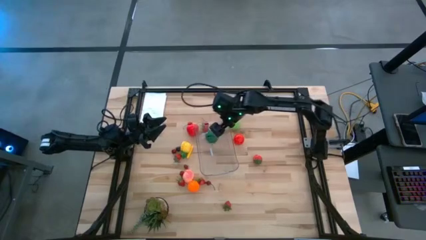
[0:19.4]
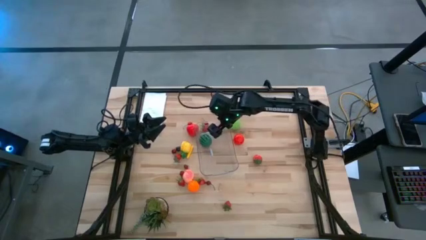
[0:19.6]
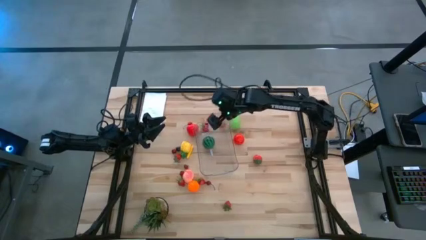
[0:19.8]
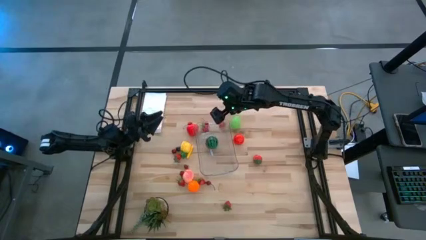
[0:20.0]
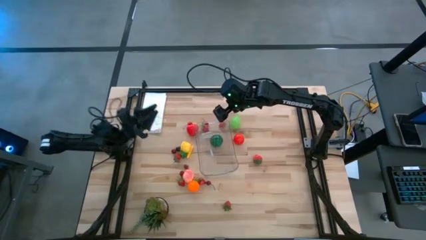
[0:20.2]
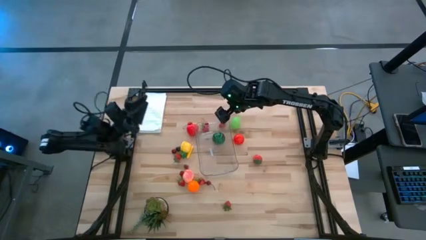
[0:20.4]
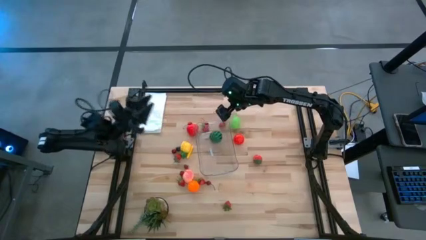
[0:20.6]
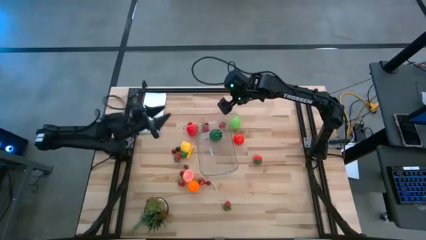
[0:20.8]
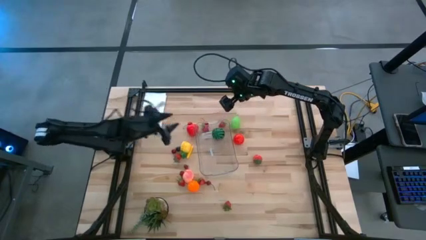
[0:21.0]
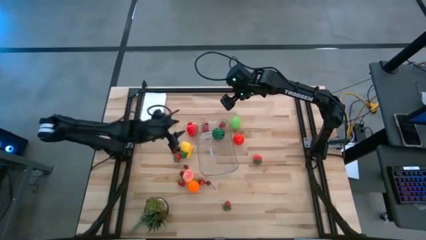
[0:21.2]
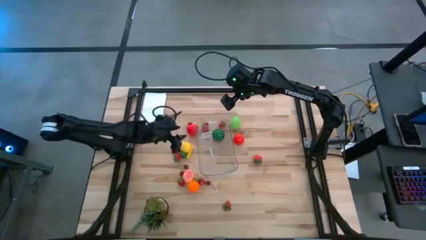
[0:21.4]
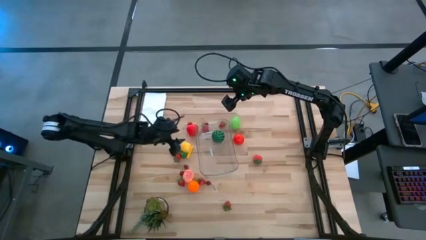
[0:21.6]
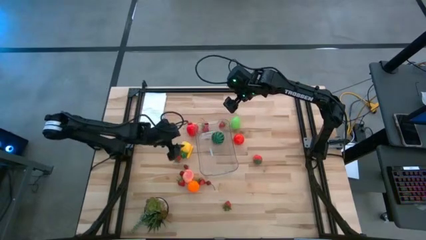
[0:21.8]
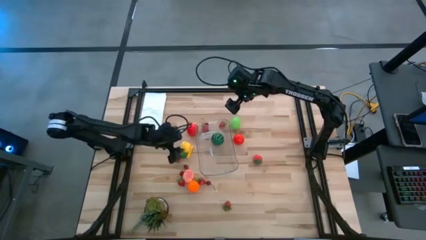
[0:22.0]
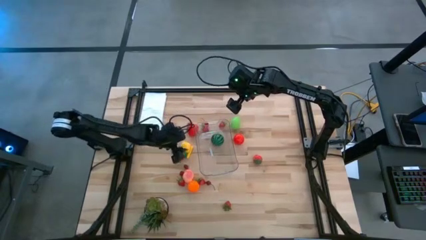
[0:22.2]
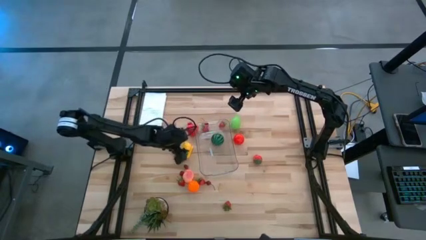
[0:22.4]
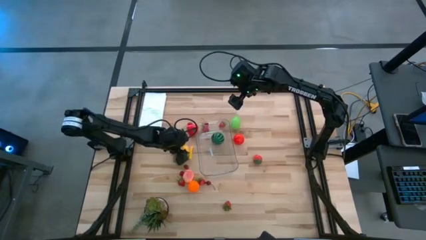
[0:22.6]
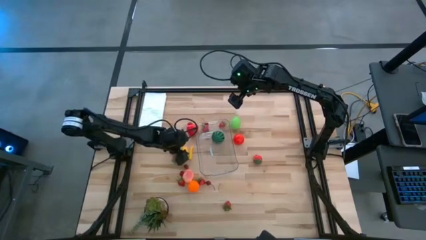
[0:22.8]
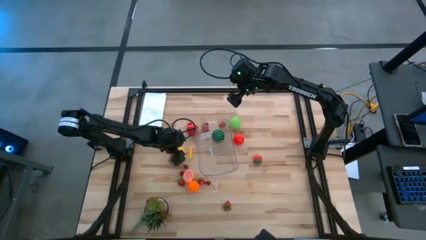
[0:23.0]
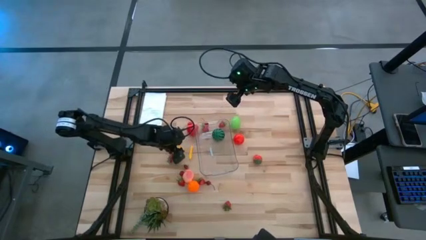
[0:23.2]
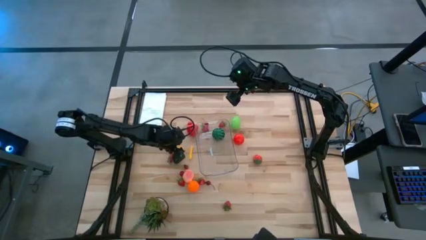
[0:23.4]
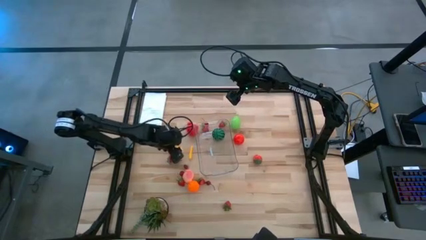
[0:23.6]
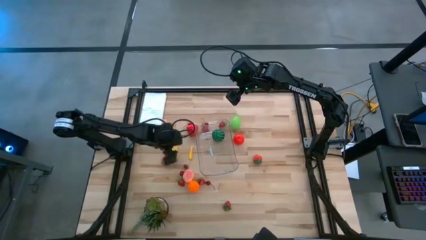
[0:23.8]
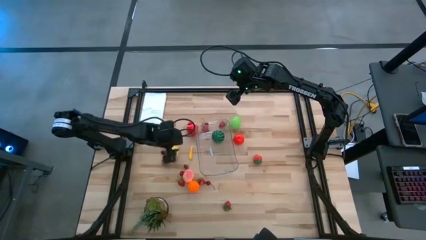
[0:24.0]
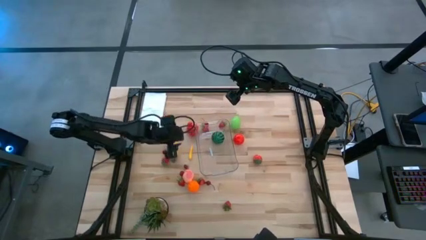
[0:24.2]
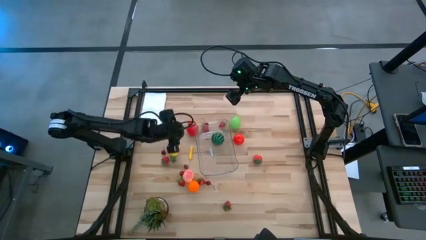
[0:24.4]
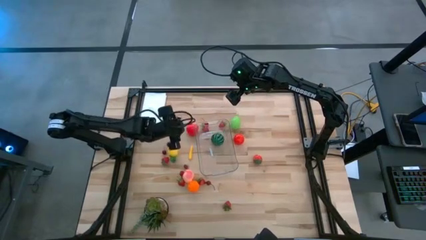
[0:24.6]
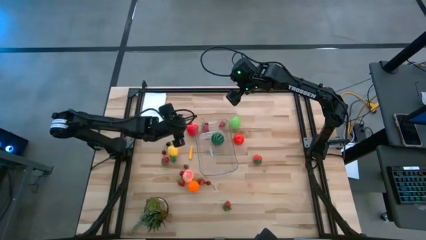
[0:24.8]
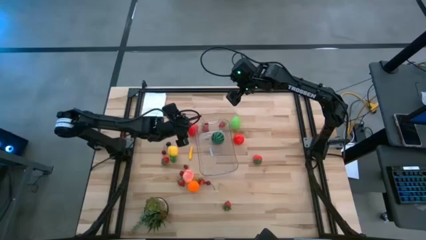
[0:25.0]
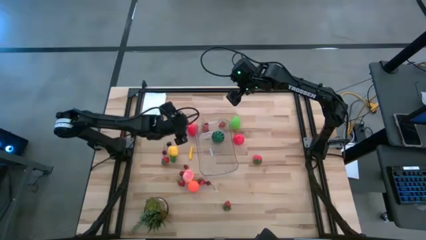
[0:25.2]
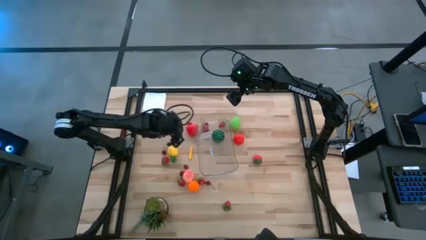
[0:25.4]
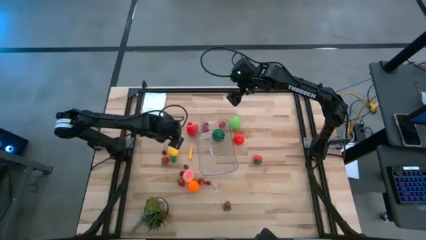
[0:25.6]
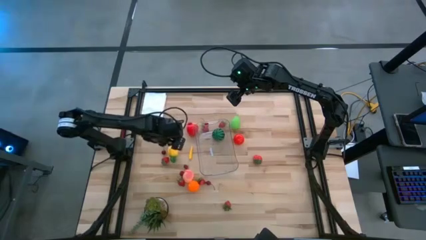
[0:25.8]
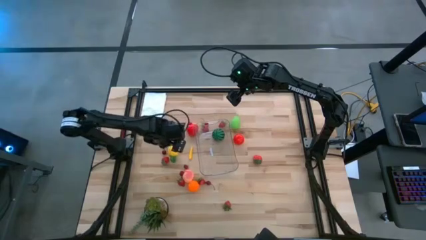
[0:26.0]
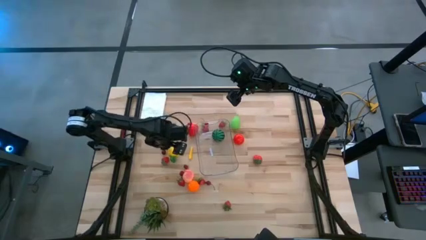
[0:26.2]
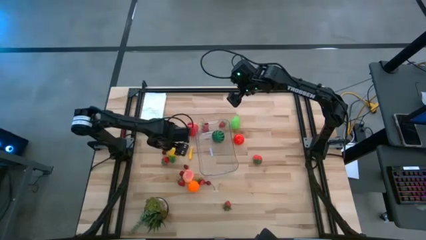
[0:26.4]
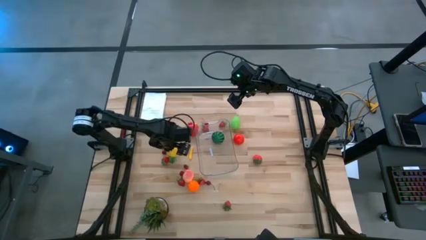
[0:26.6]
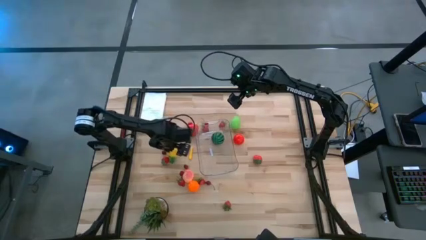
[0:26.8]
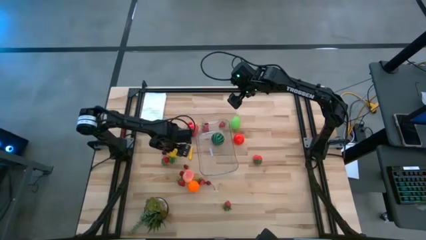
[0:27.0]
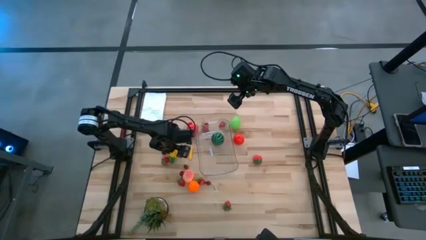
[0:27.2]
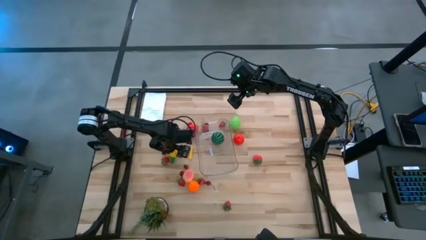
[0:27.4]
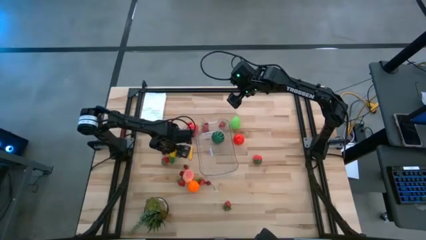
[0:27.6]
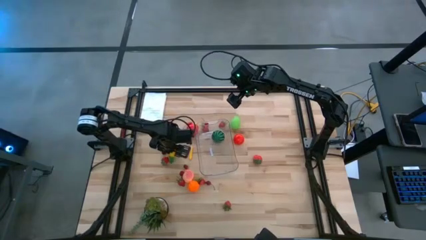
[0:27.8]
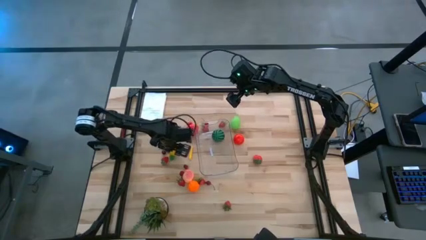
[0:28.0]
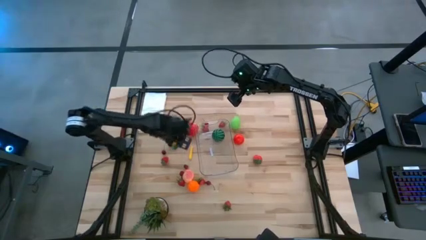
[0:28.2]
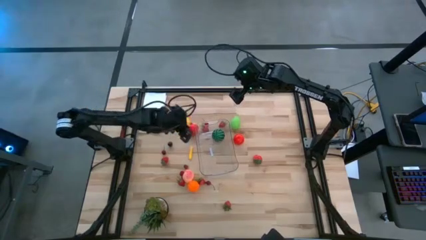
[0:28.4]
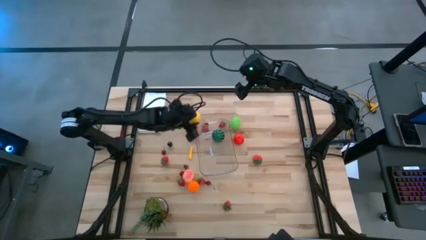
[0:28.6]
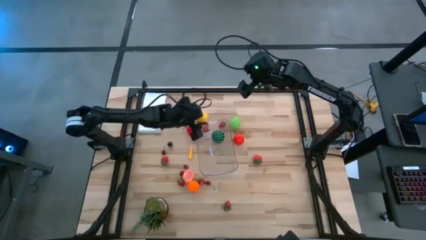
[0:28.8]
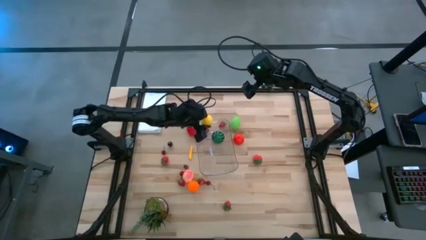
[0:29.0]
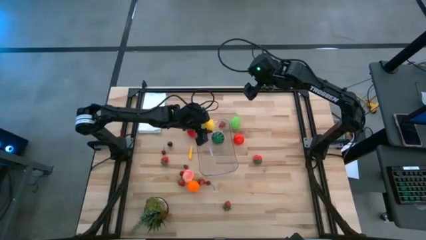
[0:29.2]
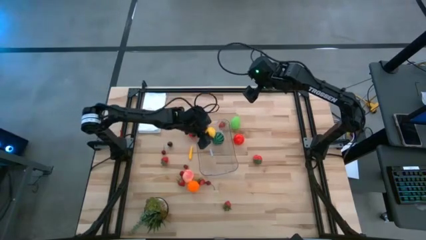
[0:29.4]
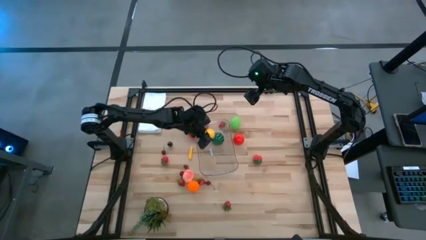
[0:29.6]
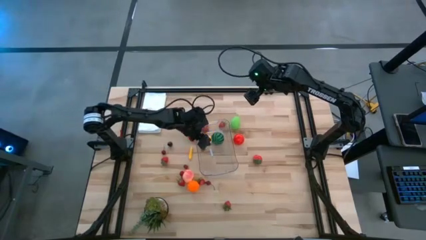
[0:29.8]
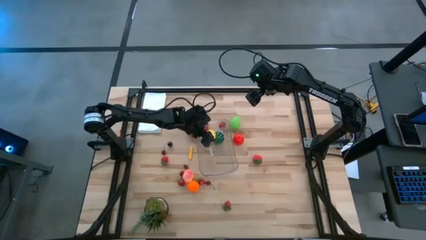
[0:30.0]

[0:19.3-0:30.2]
Task: Pick and placing Produce into tupperware
Put the pineapple into the transparent bin

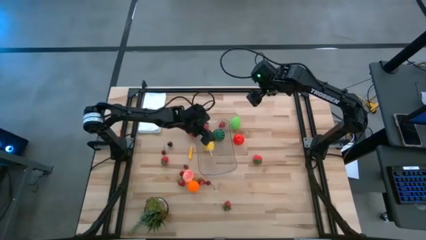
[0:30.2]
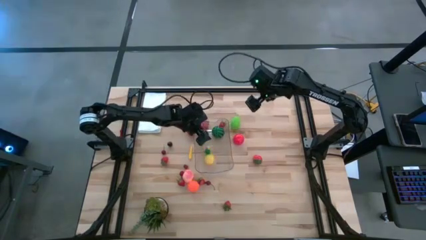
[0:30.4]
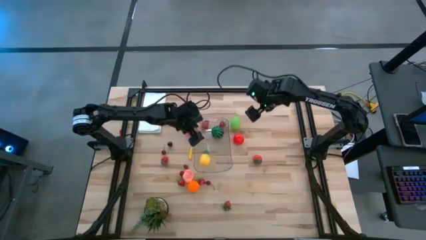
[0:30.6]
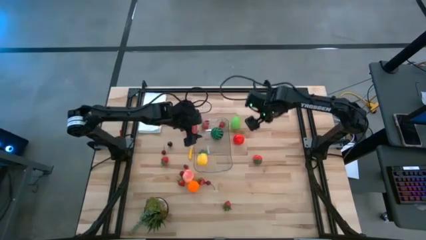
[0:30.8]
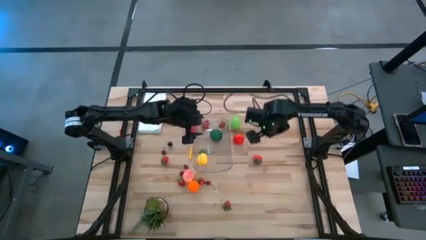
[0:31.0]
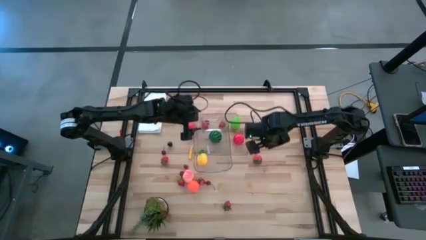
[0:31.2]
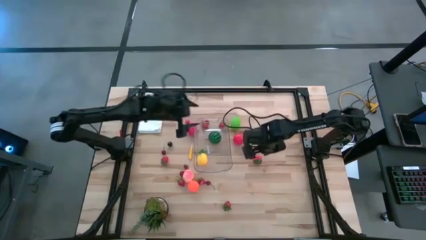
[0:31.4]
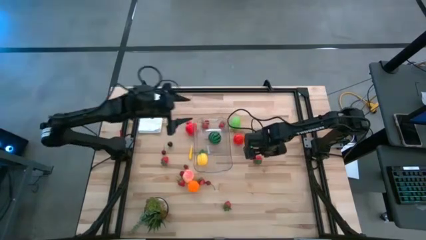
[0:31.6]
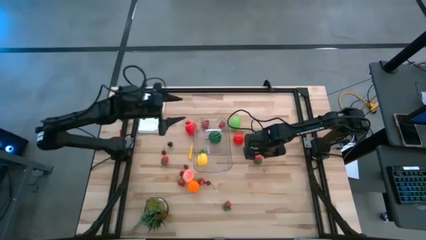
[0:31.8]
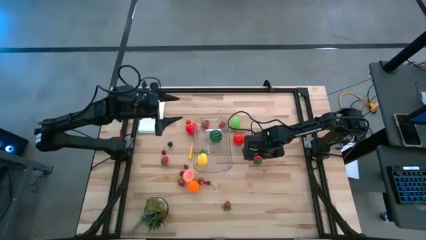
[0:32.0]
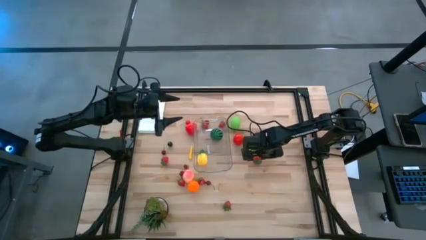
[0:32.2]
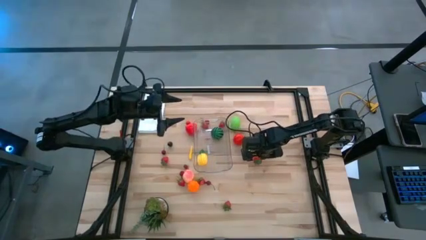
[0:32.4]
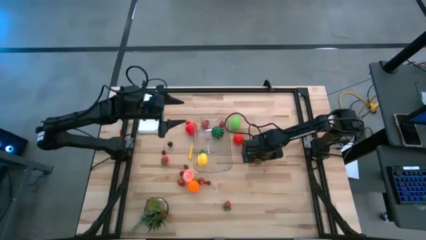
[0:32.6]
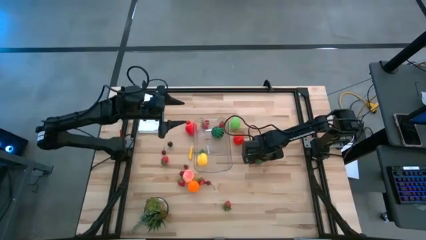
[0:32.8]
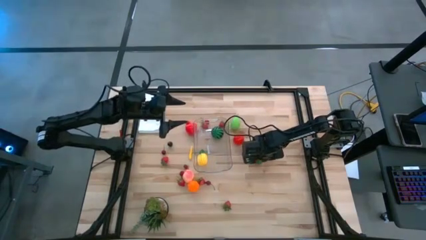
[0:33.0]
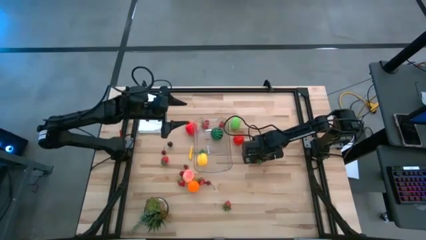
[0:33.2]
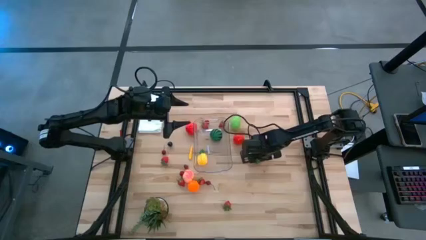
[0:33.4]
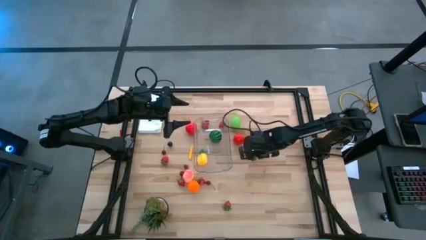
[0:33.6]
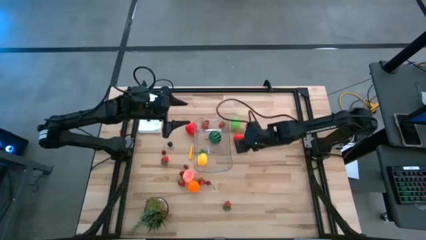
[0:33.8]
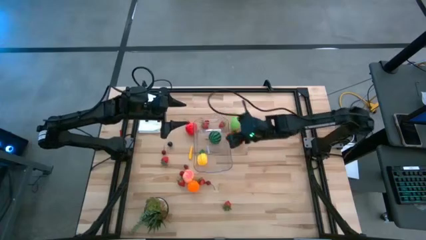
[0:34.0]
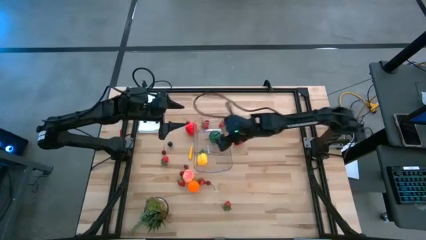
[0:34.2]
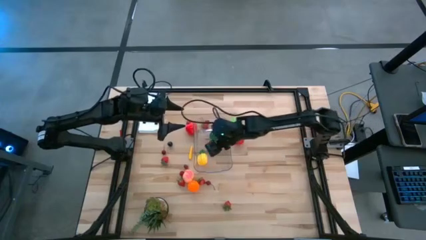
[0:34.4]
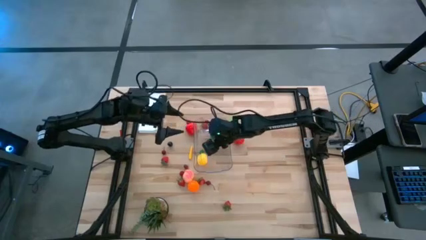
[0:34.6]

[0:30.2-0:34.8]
Put the strawberry into the transparent bin
